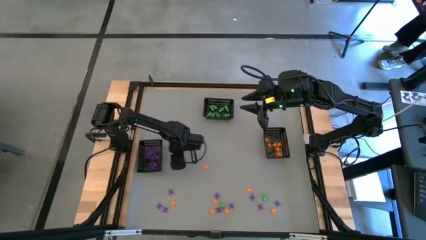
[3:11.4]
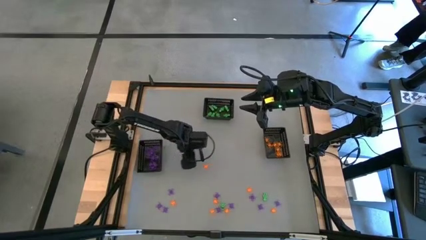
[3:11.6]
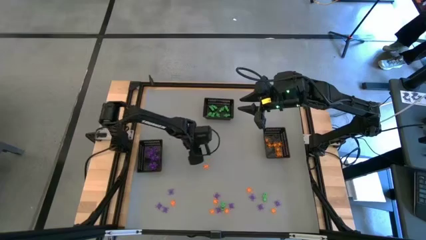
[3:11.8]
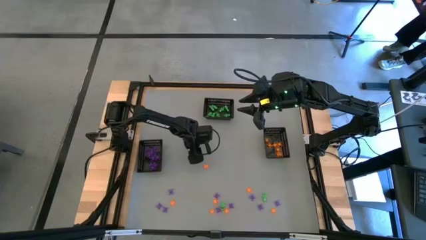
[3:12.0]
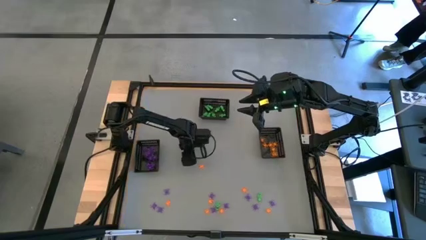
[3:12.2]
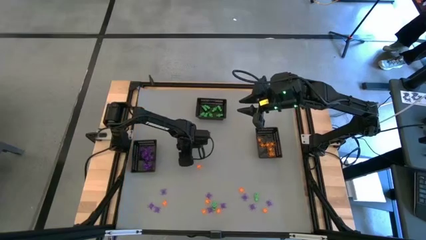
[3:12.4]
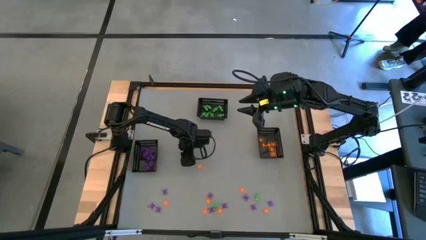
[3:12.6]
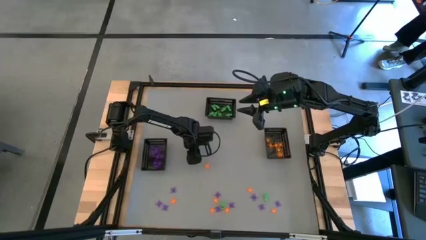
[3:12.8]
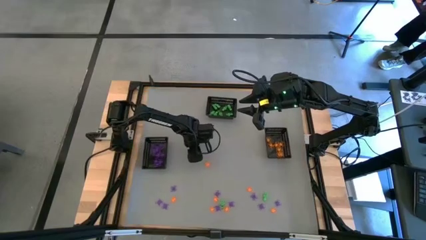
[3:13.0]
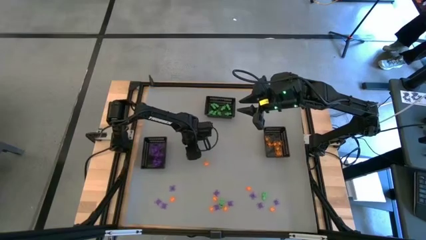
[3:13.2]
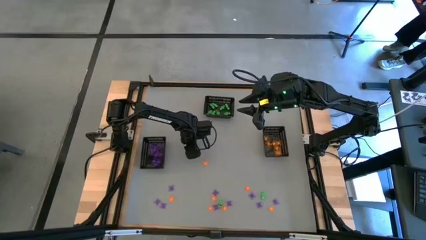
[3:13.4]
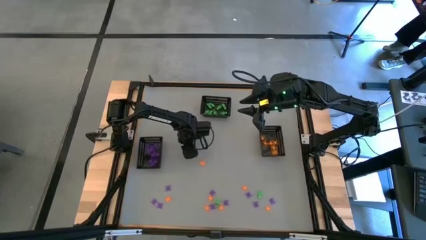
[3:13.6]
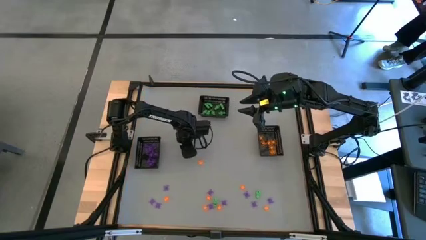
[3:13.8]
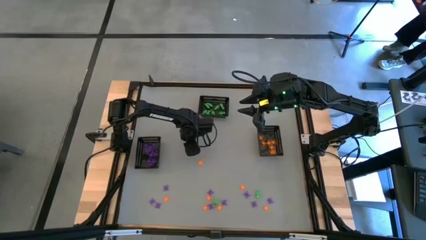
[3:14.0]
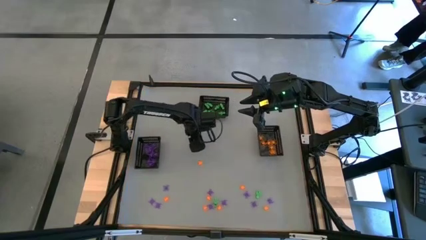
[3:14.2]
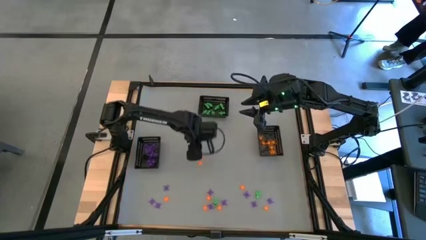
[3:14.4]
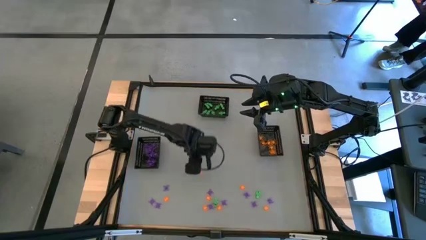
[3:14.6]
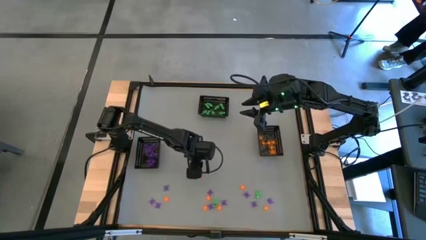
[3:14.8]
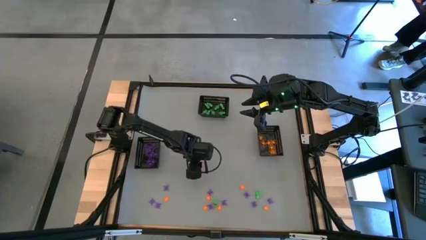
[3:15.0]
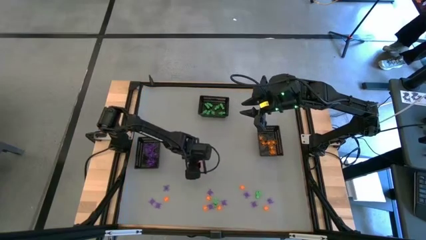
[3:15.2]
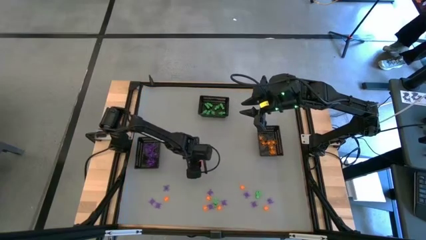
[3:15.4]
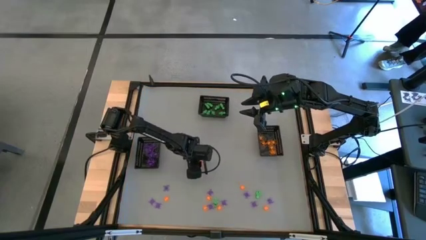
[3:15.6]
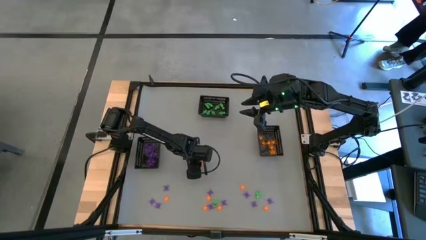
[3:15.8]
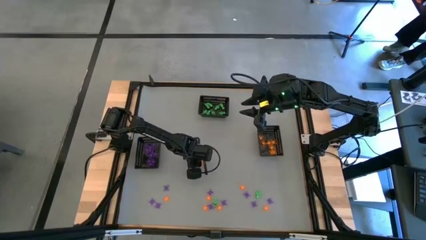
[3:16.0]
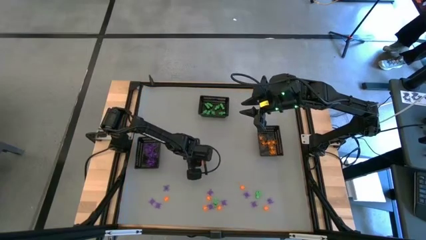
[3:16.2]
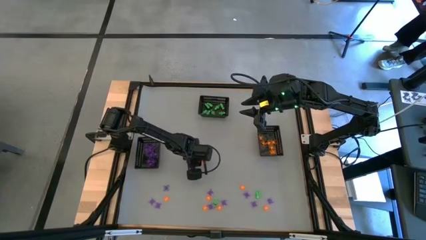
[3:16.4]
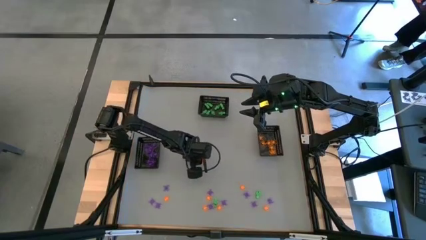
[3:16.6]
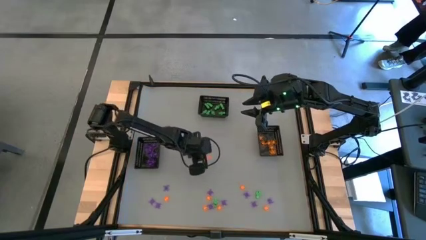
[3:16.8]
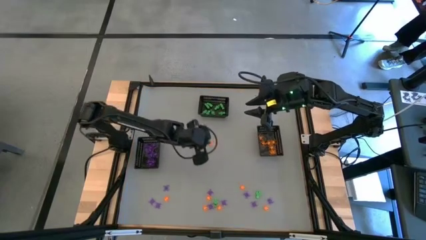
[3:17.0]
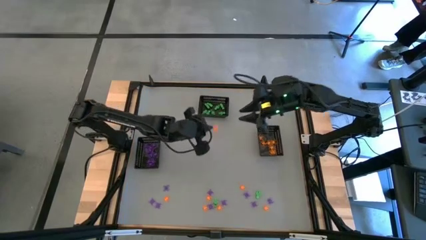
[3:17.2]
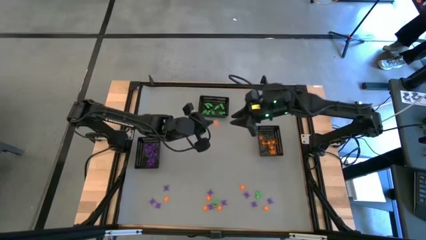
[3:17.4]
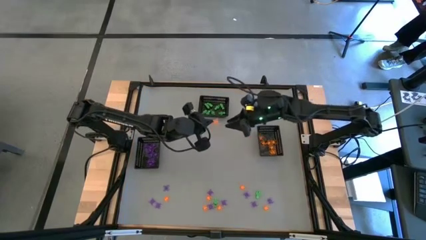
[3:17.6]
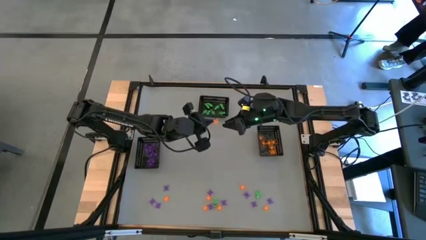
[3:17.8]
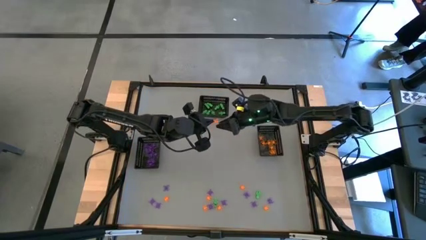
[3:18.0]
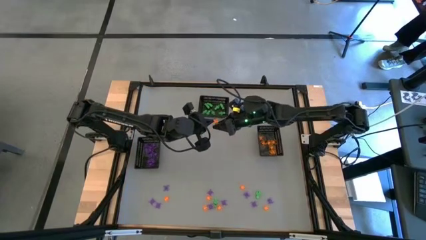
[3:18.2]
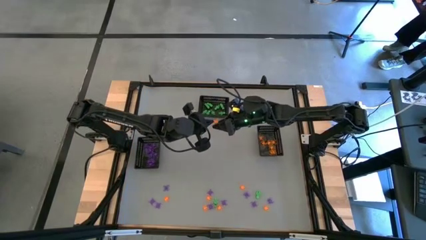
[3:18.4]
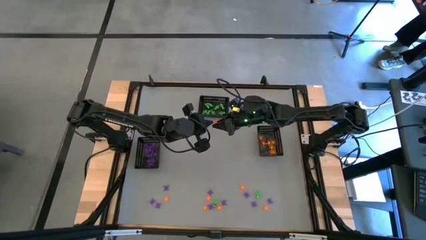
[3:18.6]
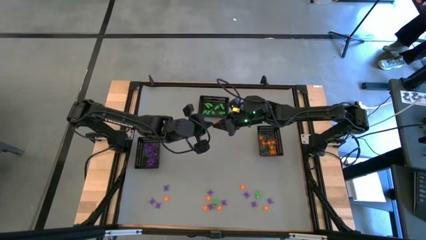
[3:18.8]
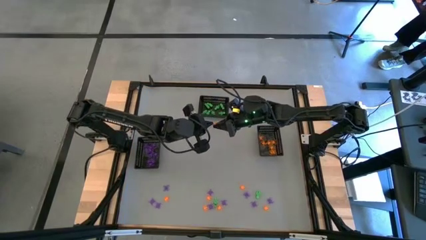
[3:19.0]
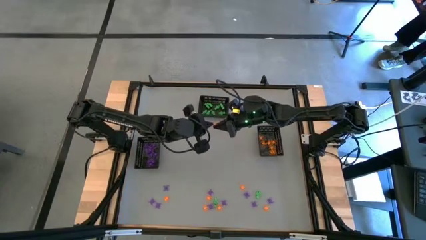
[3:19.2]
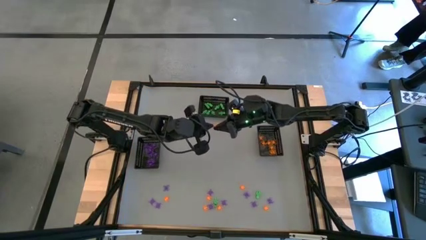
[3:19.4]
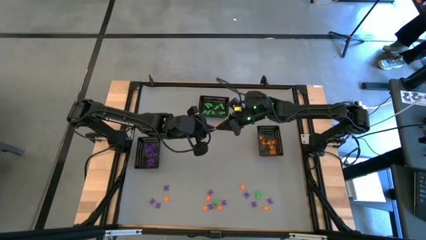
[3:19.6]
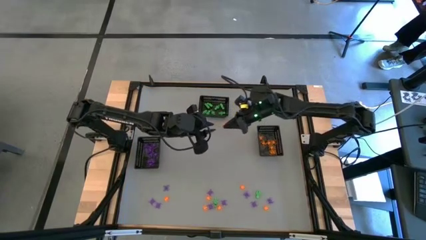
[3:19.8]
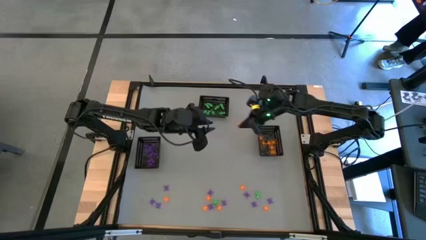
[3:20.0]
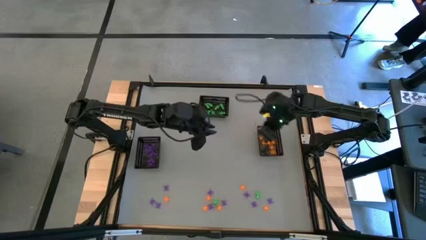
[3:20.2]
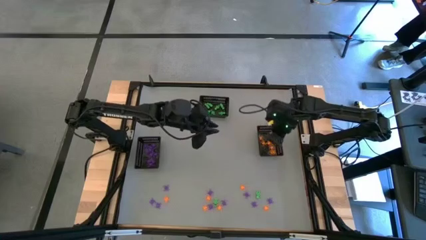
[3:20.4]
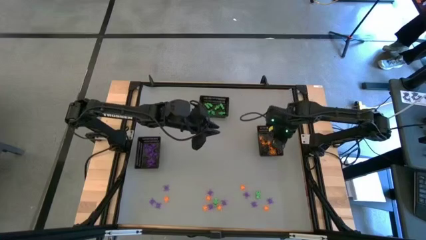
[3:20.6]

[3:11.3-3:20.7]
Task: Sort Halloween decoration
Put the orange spider toy into the right bin

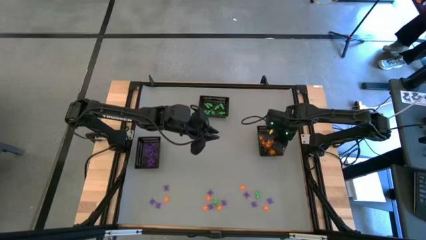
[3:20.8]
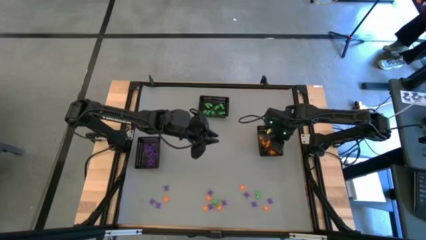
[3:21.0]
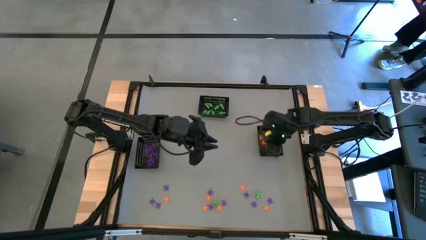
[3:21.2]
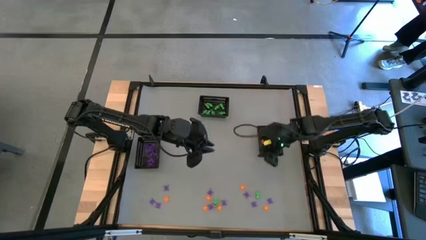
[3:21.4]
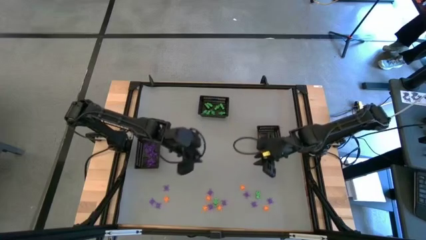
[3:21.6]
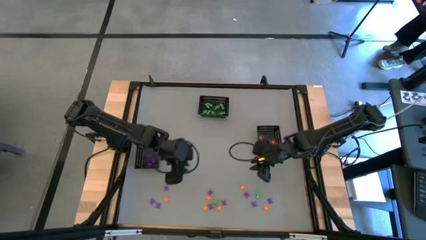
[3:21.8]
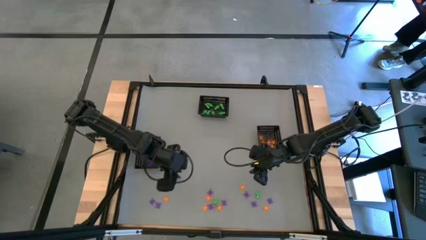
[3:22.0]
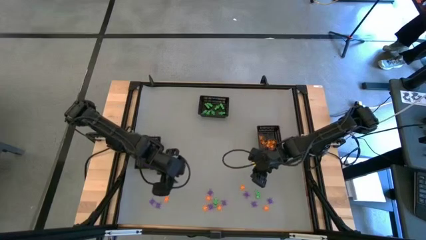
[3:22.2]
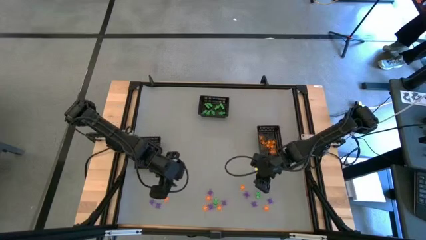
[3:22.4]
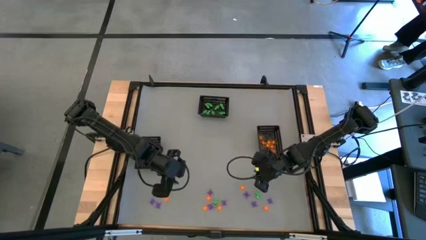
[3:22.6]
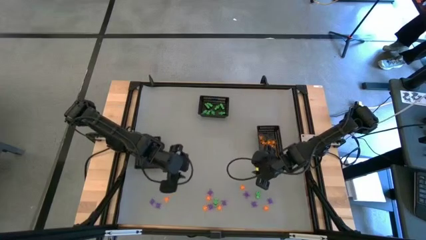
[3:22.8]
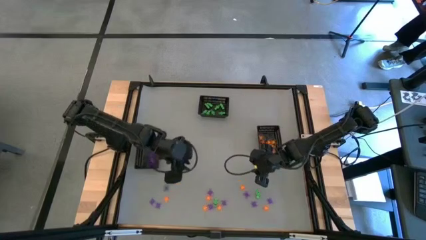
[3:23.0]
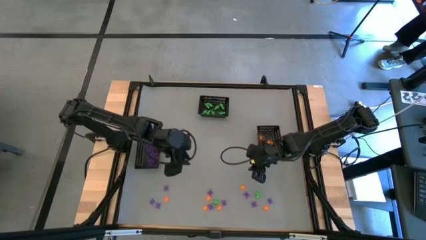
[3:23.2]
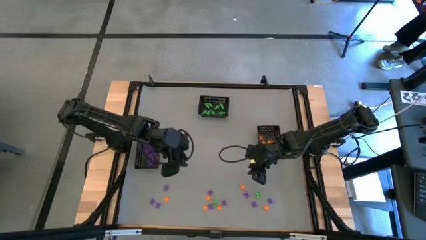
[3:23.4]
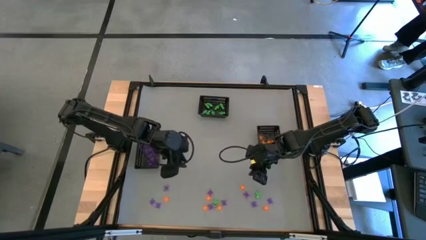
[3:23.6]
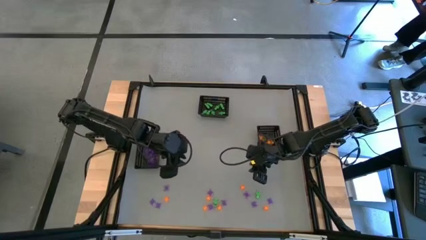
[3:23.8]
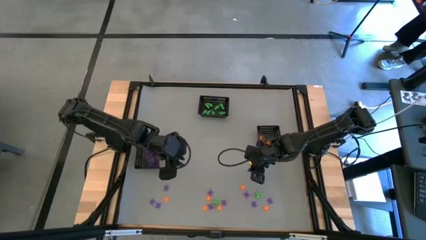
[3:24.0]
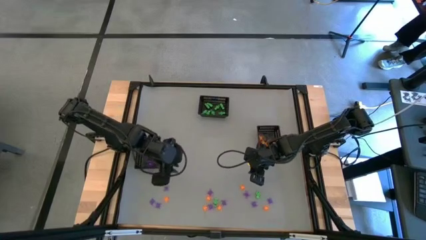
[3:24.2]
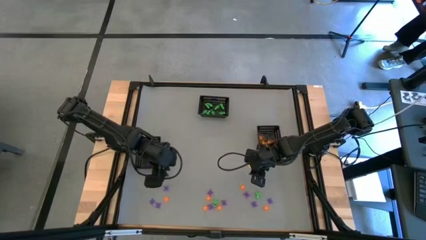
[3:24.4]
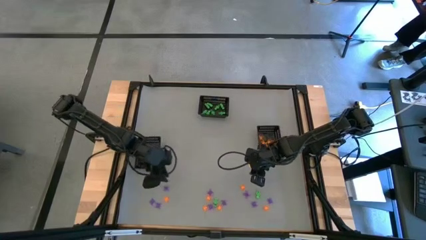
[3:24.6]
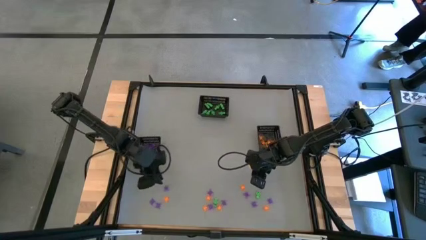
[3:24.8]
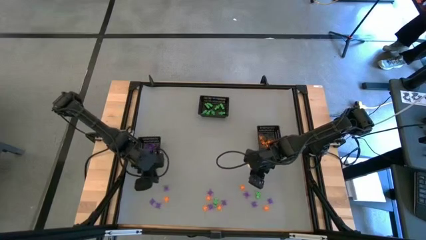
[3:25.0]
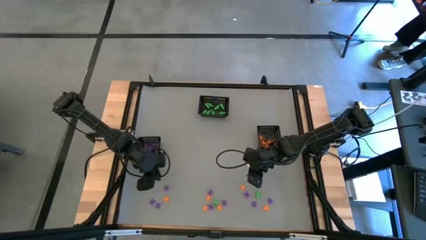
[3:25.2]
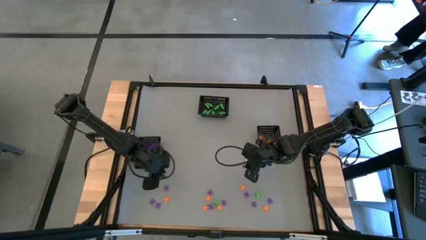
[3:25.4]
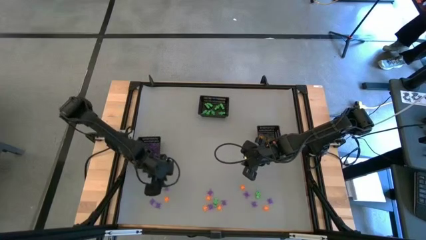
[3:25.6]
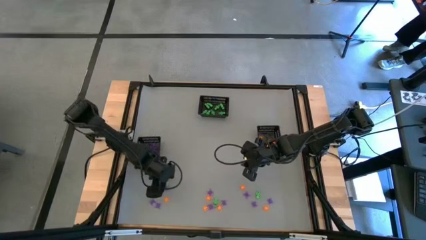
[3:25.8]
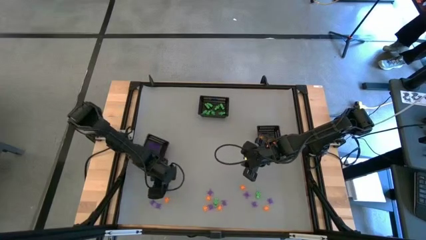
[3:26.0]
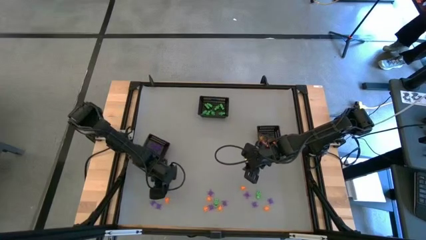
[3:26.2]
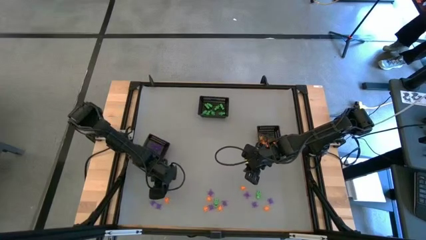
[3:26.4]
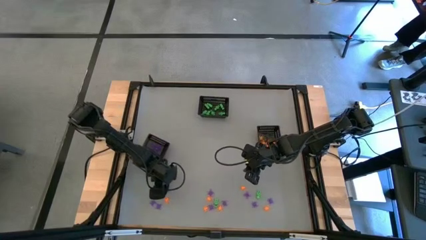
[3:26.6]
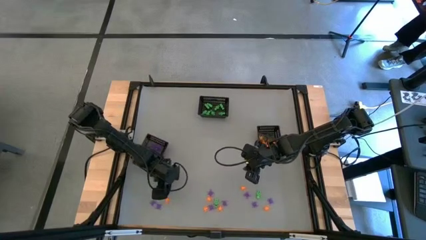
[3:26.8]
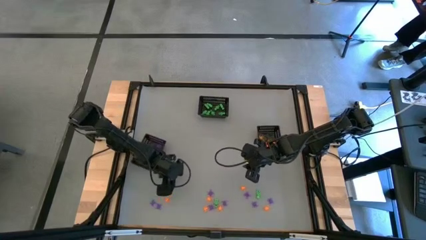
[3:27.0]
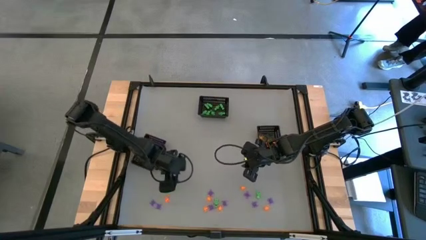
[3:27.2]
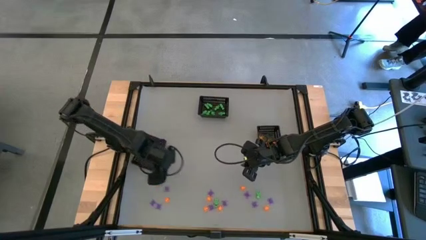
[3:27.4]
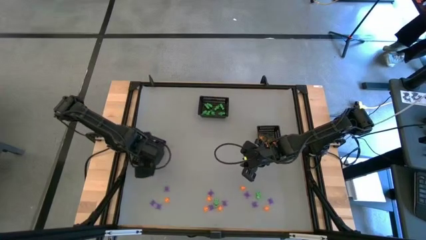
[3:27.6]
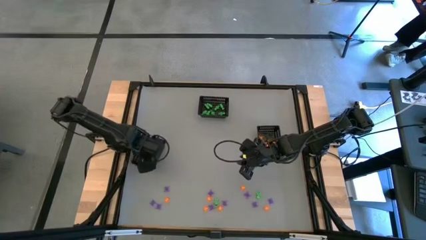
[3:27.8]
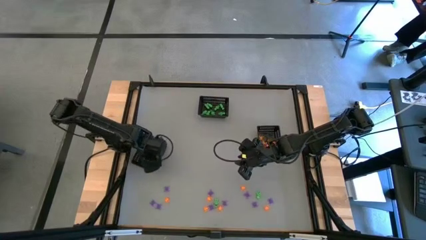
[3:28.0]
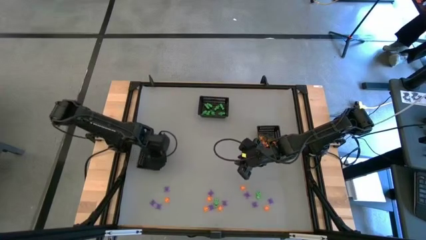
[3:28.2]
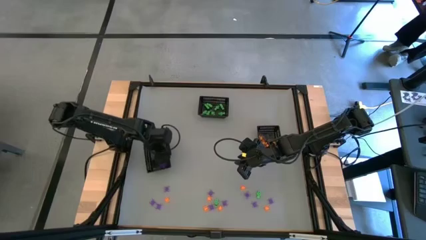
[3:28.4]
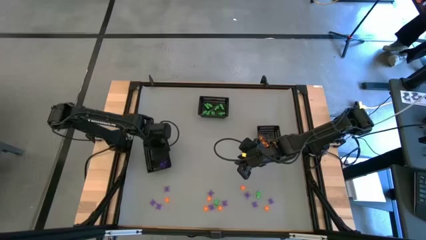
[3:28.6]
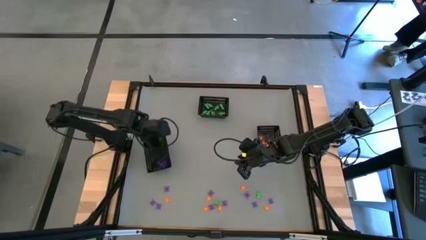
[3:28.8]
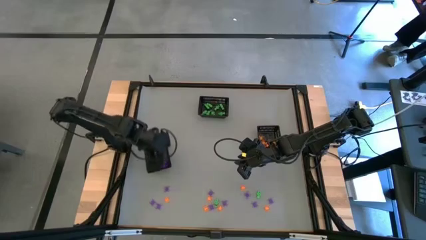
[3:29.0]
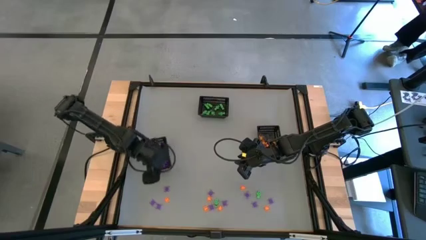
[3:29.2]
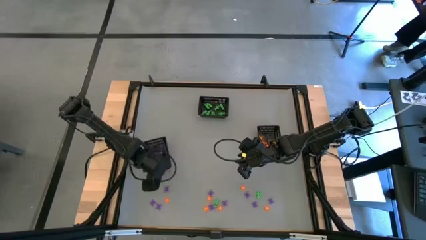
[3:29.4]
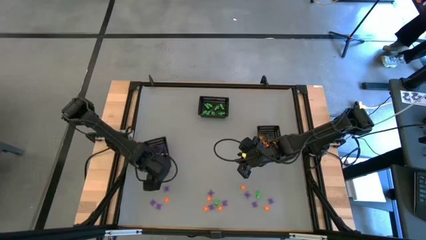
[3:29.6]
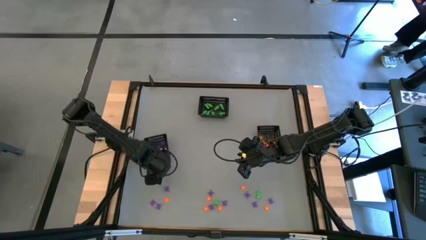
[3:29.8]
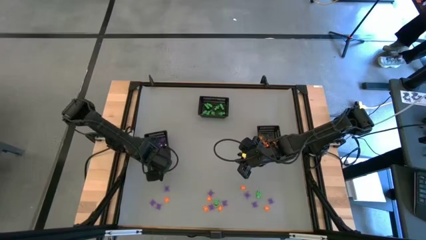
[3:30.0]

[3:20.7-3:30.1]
Adjust the left bin
